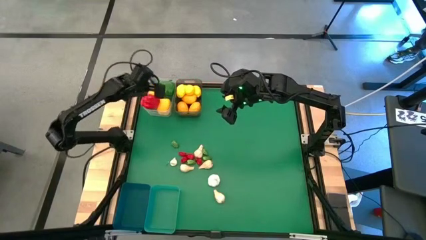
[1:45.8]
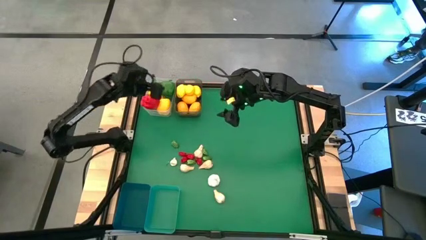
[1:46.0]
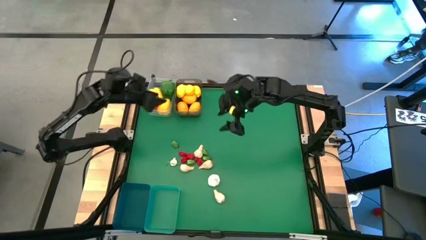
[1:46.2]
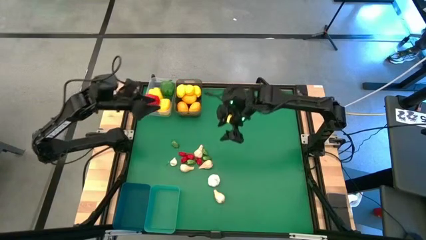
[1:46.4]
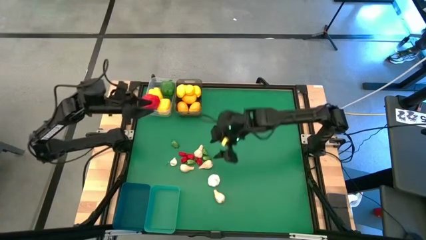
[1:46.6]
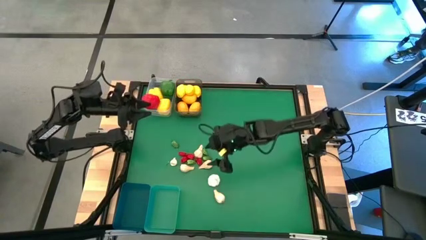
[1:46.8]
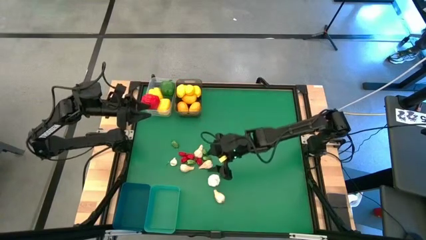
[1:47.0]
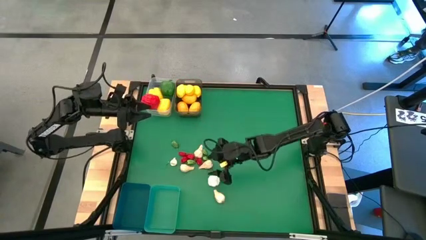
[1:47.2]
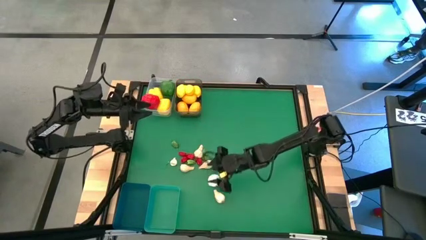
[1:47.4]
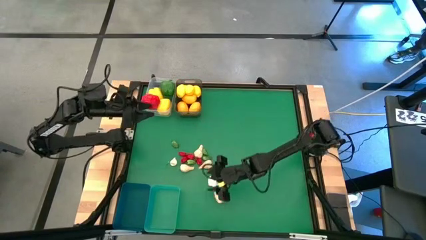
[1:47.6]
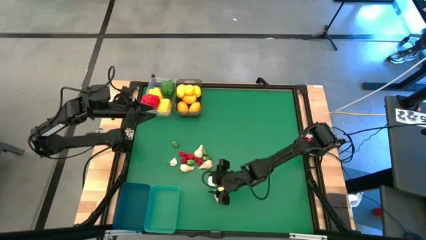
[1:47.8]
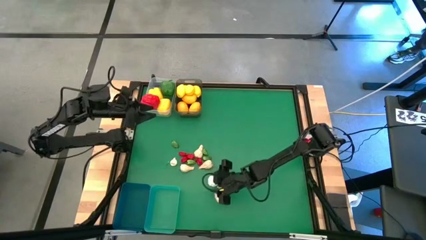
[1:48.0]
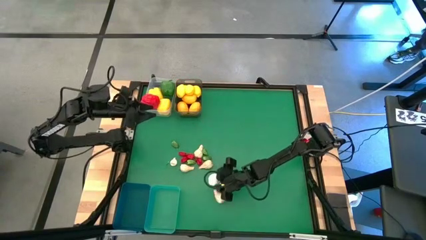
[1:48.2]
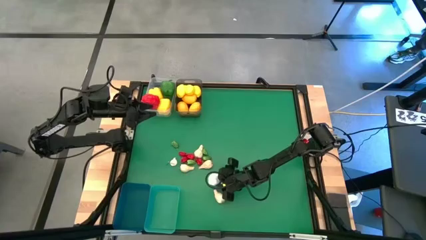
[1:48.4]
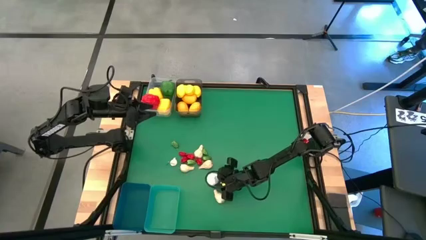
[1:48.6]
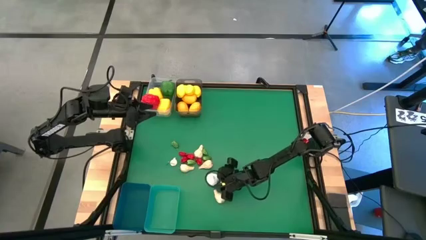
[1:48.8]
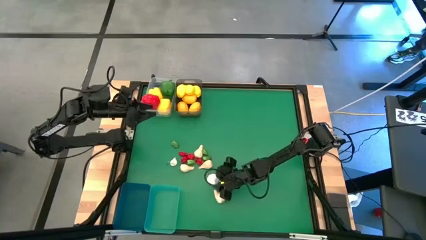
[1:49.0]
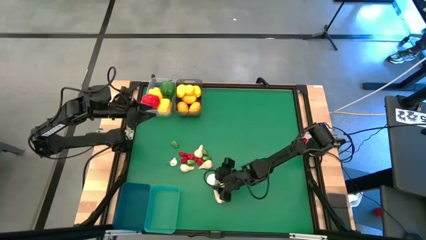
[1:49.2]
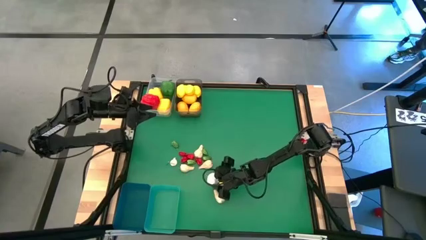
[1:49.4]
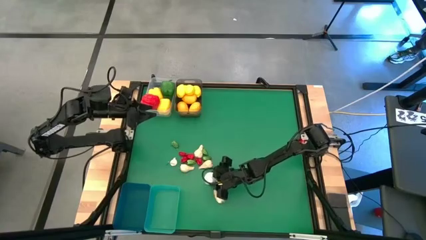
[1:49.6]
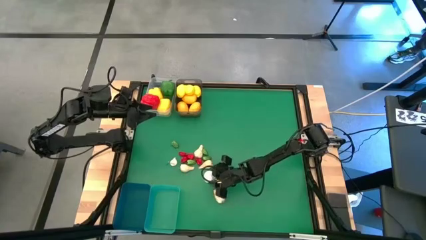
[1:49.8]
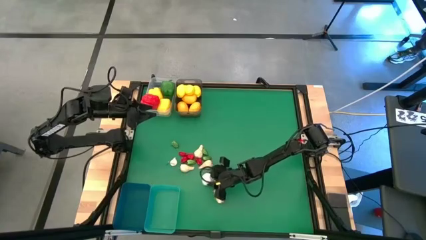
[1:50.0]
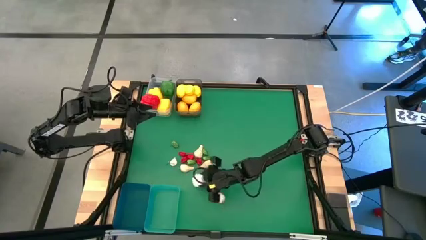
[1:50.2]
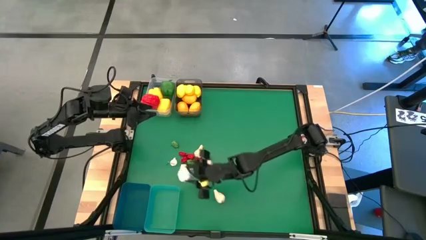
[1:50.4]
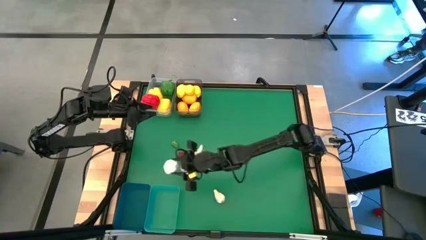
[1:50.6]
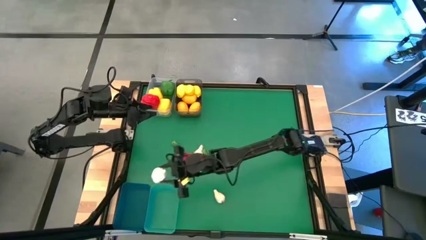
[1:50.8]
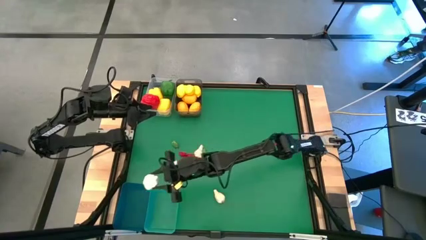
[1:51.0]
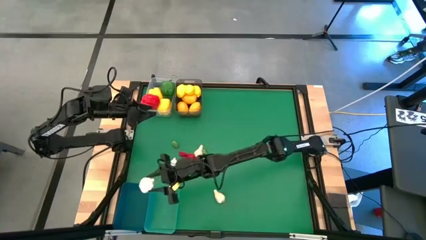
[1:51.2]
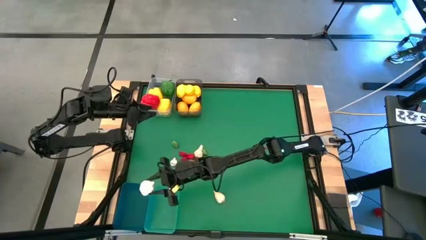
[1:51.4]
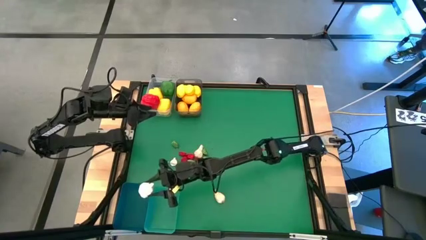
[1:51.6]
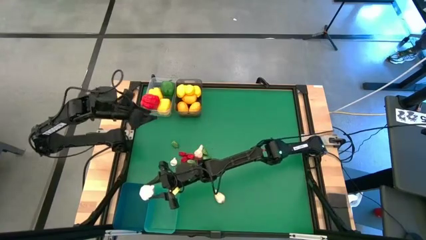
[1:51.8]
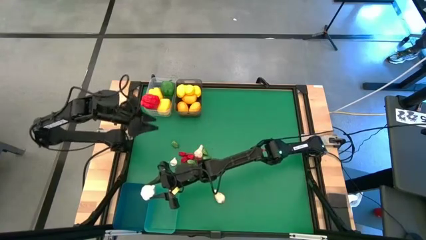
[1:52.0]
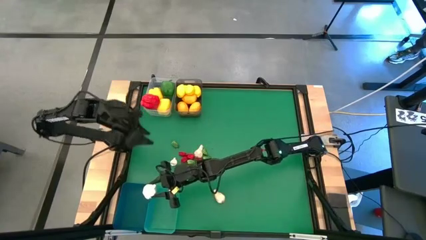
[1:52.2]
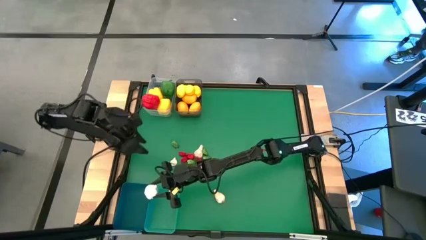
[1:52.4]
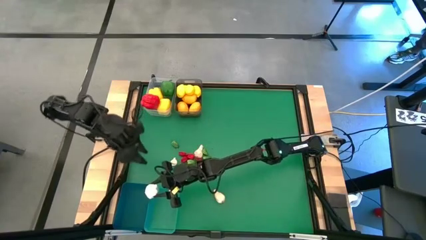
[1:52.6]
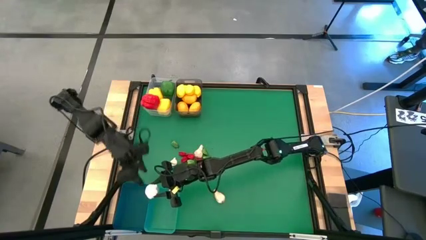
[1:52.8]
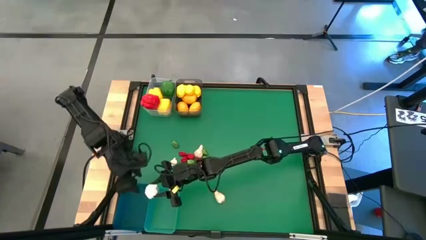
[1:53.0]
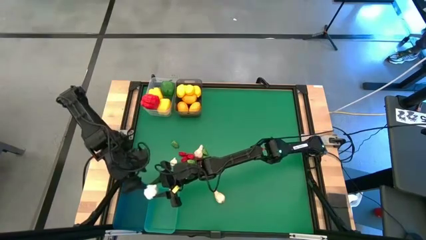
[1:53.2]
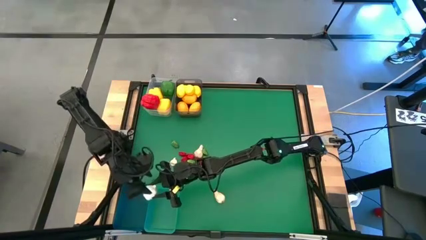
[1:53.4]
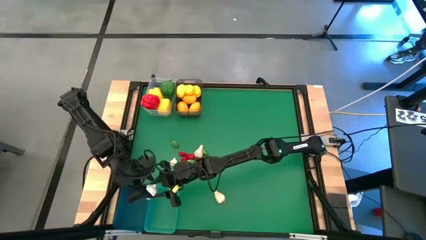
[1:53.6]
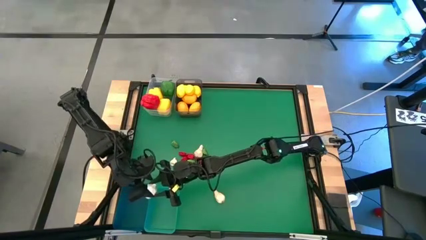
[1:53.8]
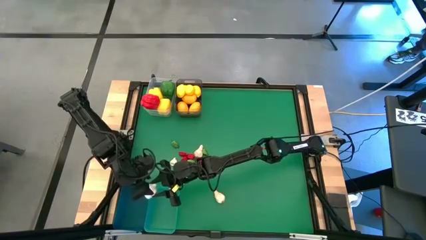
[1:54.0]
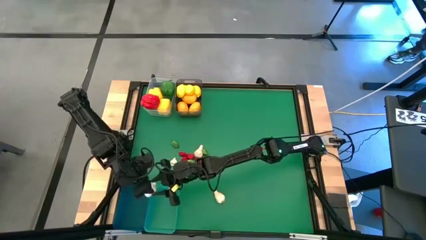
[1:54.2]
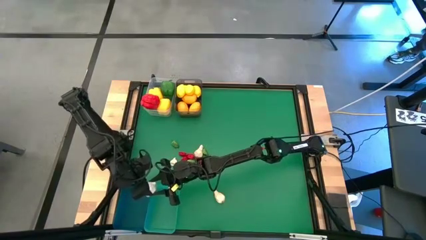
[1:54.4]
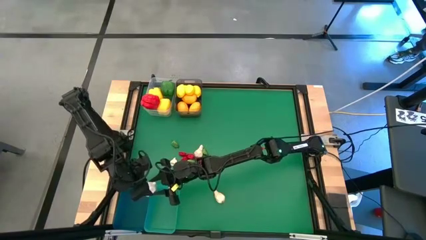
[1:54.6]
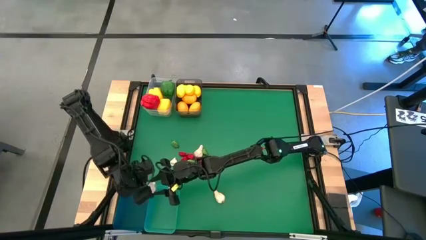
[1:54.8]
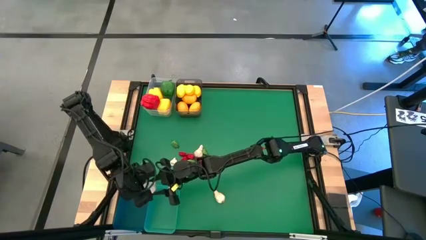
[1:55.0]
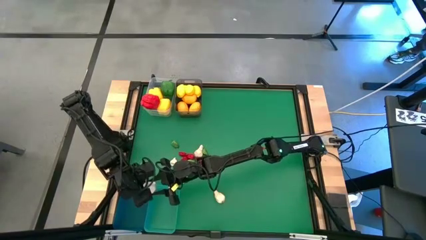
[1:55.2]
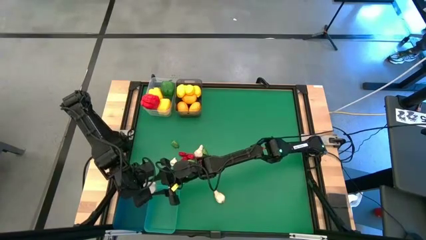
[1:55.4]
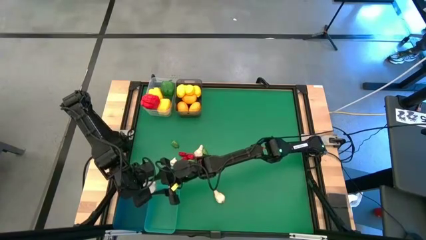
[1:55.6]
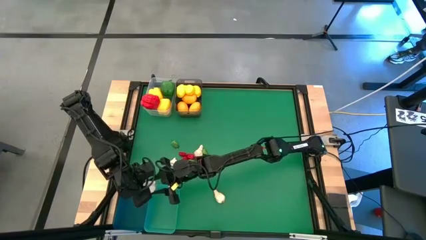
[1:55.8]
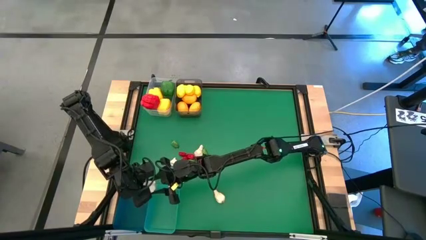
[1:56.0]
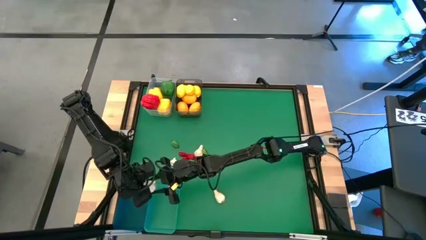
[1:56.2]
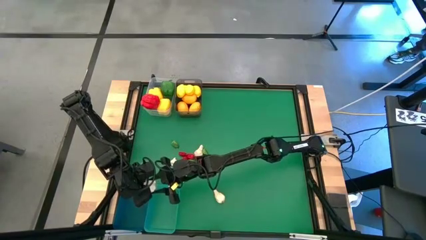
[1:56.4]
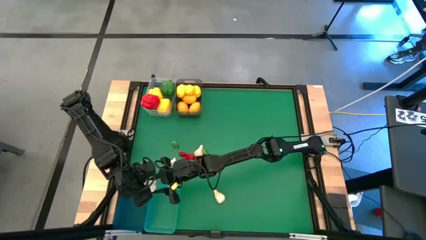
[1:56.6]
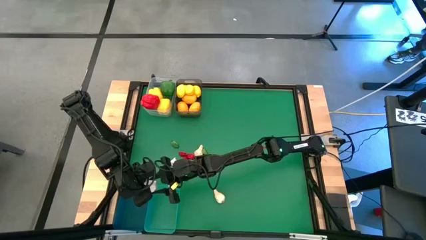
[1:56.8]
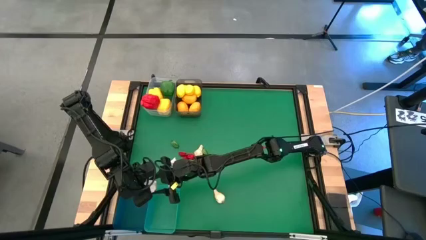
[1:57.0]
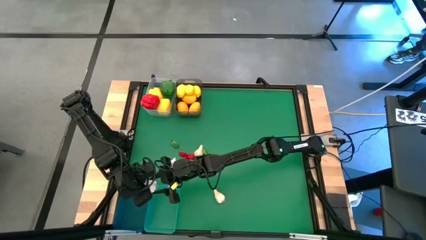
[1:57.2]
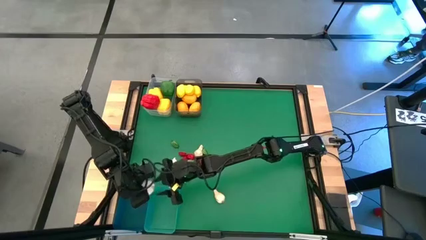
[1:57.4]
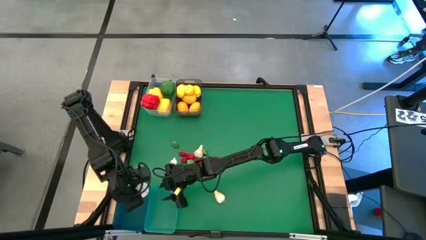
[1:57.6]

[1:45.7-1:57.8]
Task: Sort produce into baskets
Put the white garlic into the blue bin

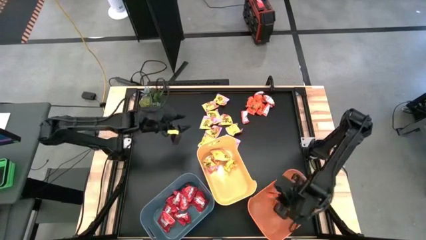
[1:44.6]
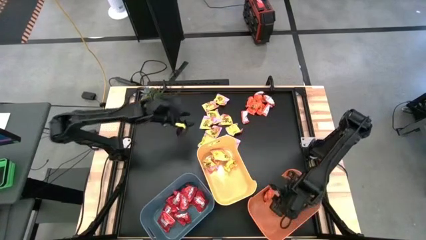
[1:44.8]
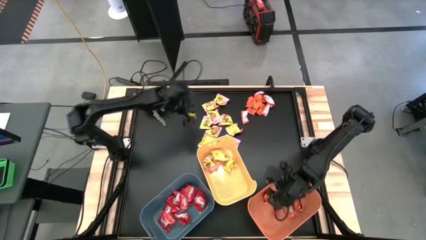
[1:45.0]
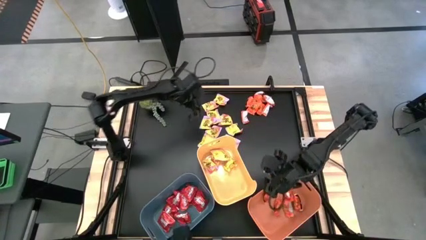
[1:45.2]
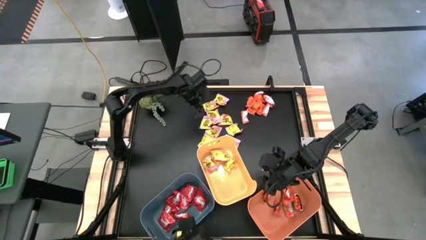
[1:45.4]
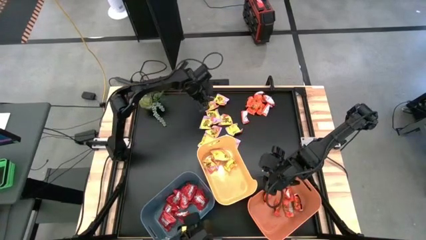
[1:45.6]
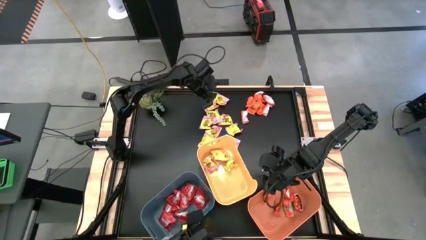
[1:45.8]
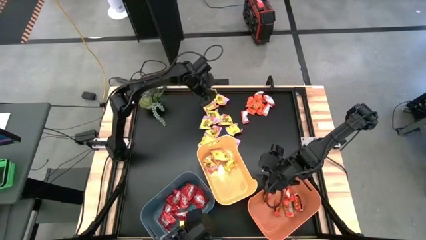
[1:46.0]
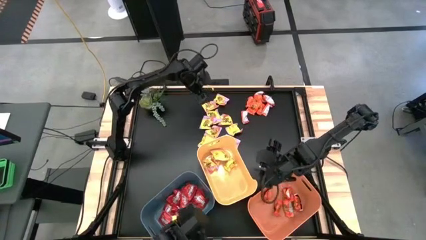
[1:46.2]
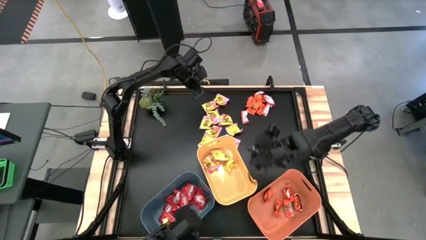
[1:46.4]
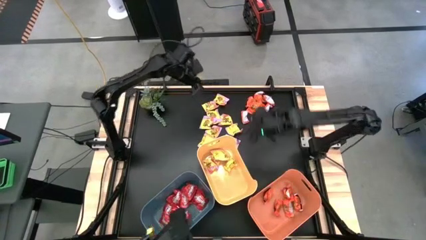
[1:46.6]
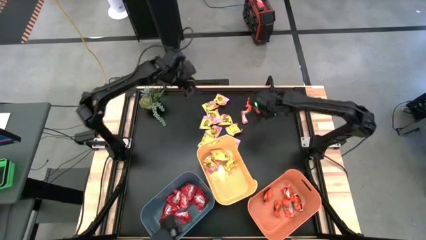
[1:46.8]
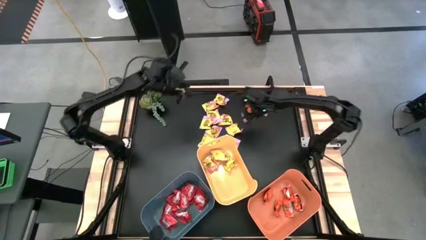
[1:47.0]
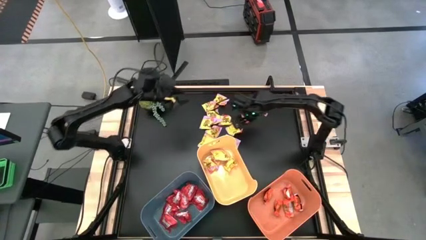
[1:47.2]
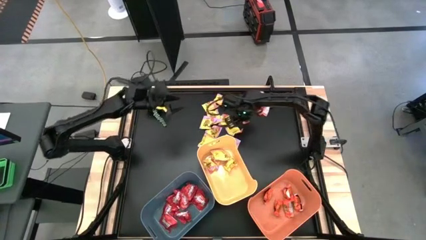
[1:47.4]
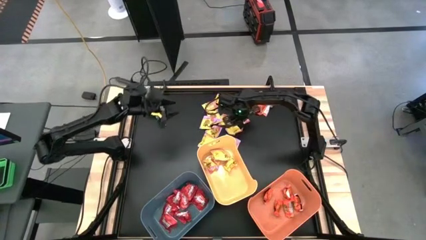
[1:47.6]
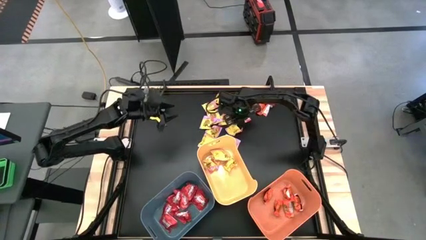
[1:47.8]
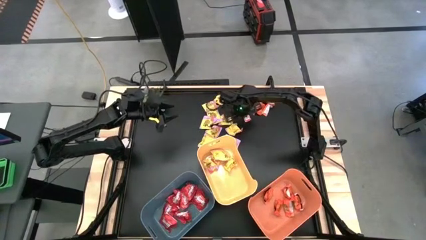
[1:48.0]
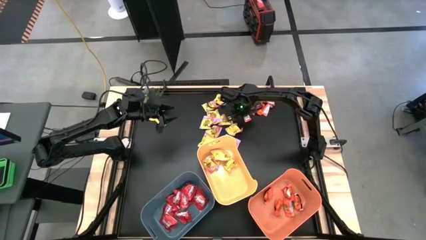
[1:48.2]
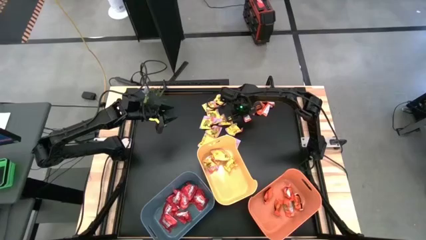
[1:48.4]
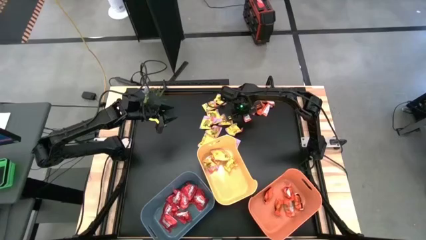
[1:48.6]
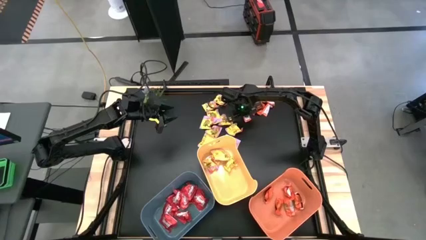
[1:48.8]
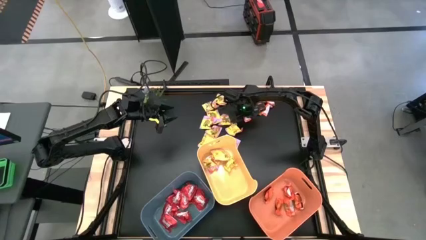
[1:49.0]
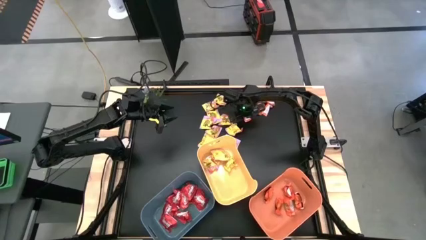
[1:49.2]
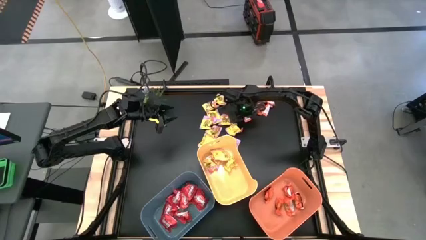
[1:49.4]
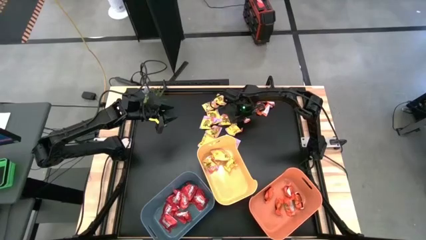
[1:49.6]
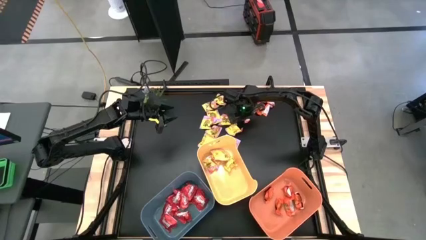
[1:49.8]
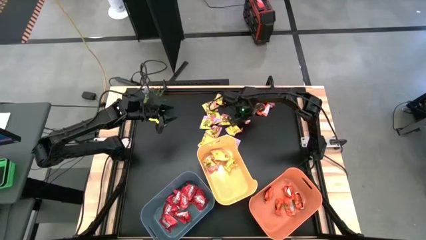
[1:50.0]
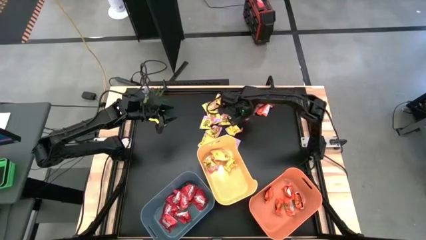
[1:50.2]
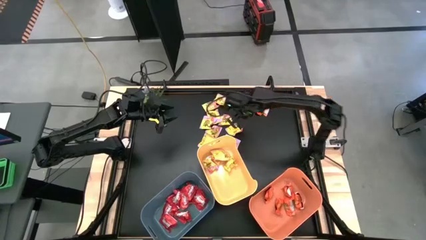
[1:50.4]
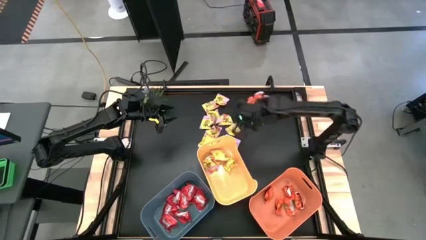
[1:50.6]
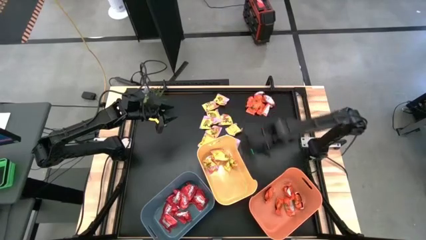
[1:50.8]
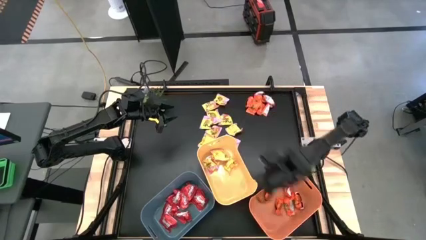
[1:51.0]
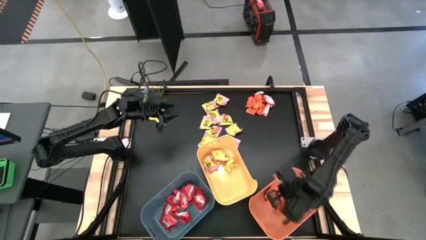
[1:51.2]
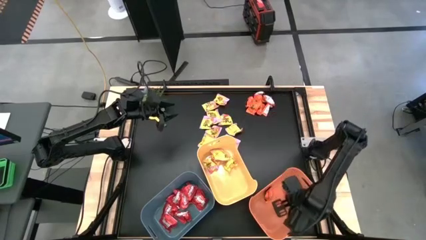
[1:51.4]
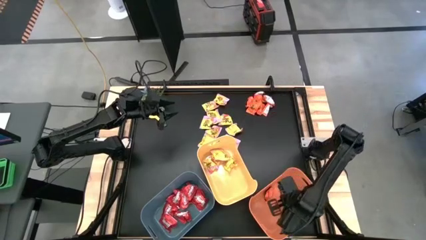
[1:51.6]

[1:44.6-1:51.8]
Task: Sort candy
Put the orange chocolate into the orange bin
